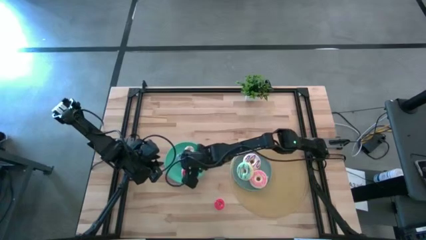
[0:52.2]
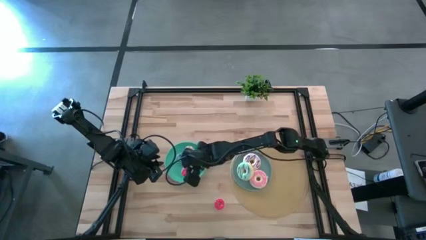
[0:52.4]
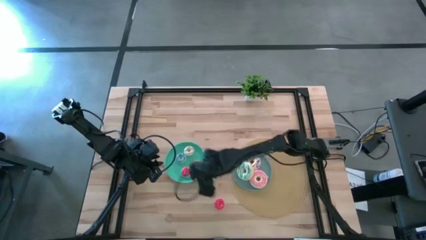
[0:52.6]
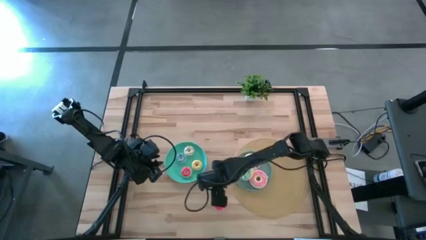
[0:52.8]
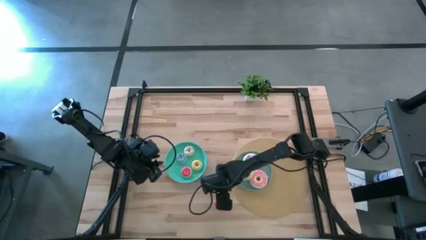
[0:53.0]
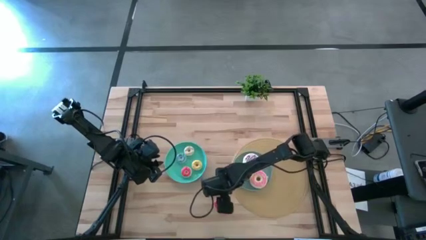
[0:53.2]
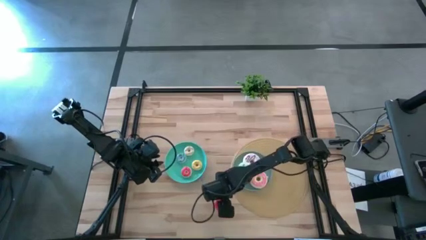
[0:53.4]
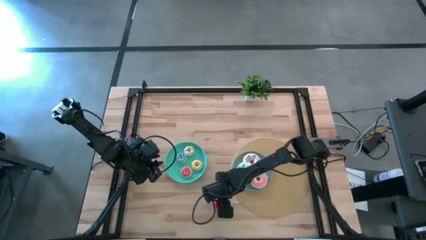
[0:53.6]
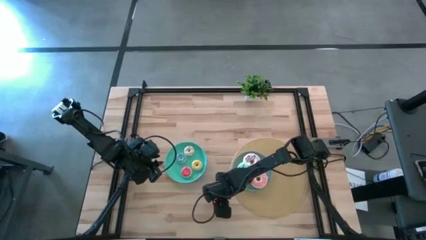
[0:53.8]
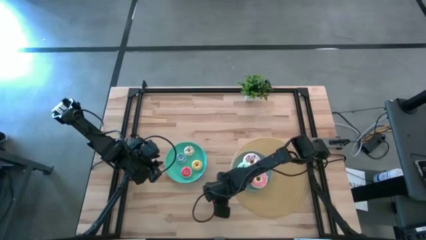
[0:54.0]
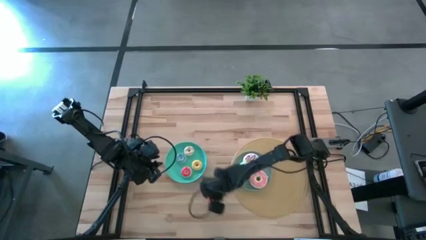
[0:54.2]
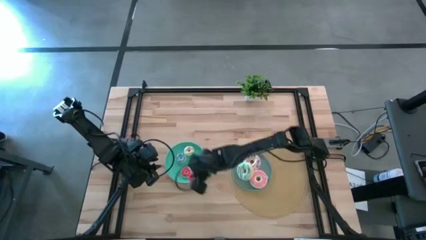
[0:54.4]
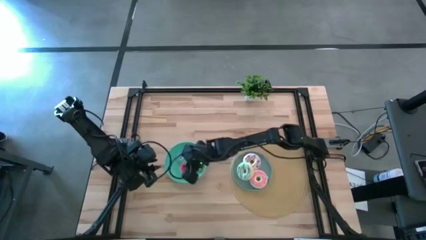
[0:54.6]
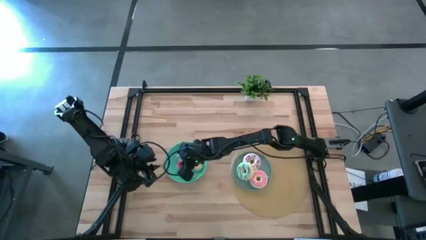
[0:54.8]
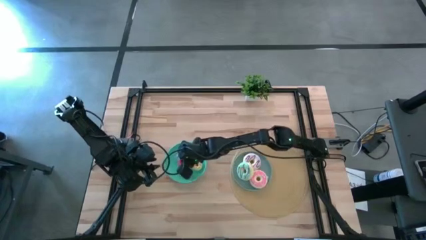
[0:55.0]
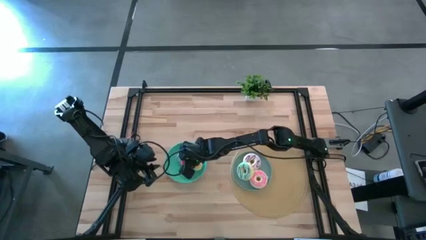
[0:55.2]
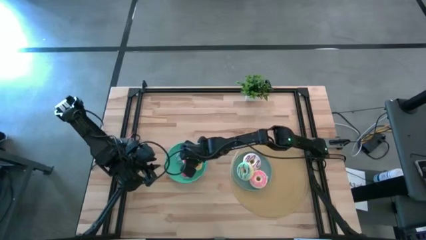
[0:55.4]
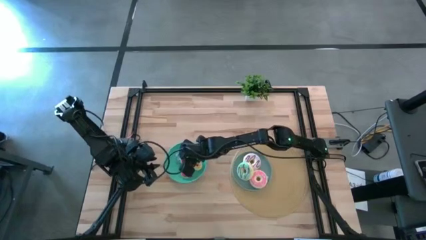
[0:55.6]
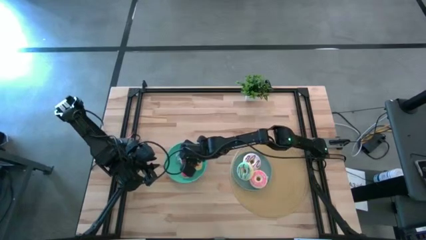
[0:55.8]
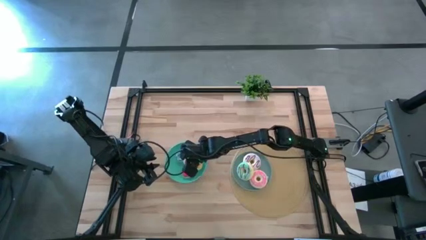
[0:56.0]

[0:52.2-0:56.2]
Task: Pick & Place donuts
Put the small red donut on the light blue plate

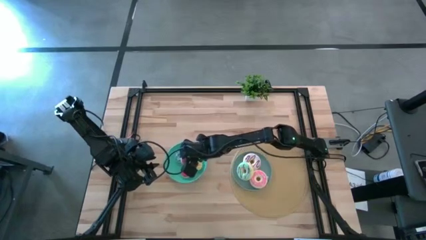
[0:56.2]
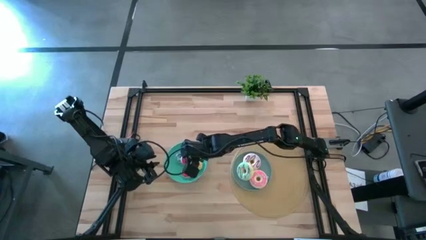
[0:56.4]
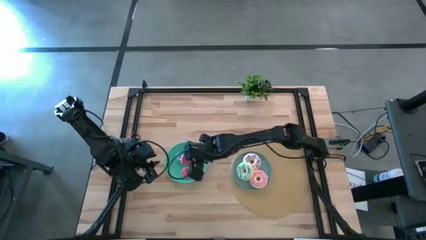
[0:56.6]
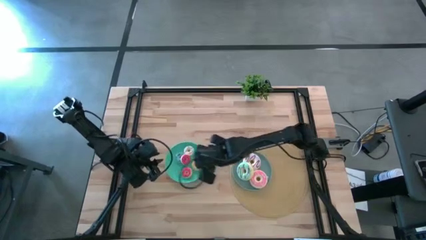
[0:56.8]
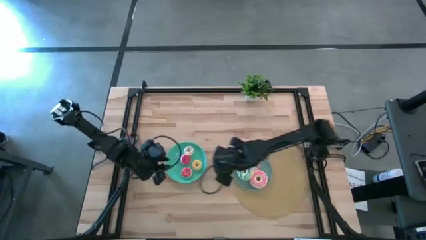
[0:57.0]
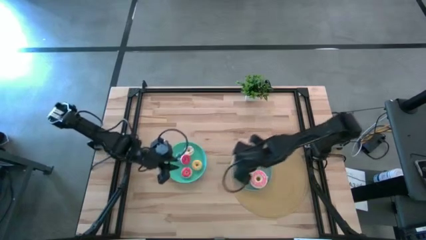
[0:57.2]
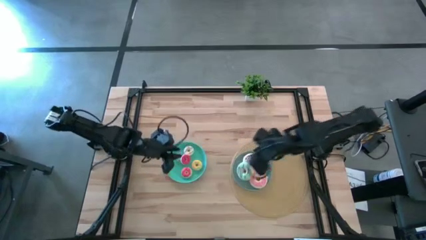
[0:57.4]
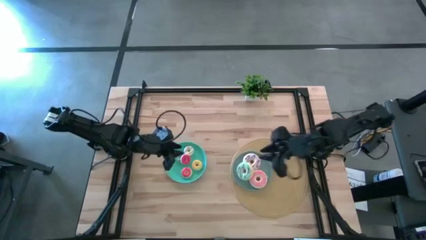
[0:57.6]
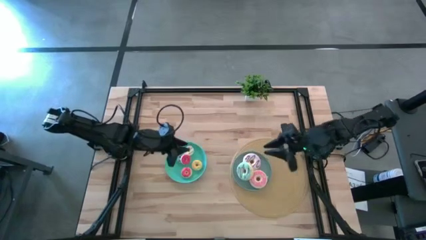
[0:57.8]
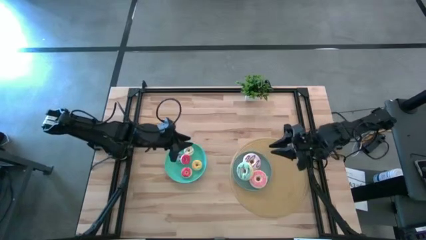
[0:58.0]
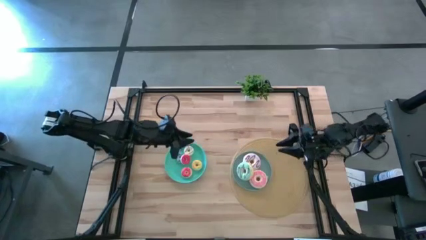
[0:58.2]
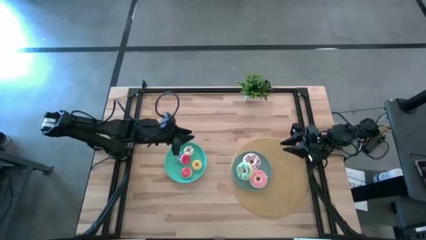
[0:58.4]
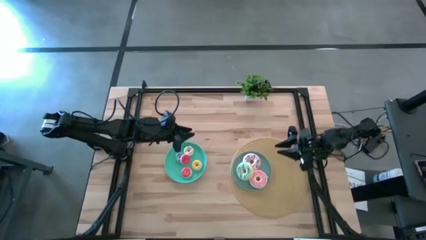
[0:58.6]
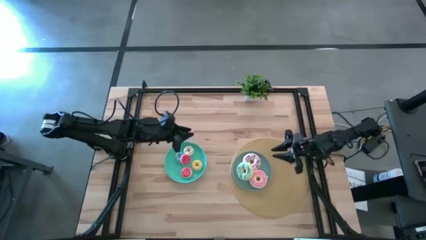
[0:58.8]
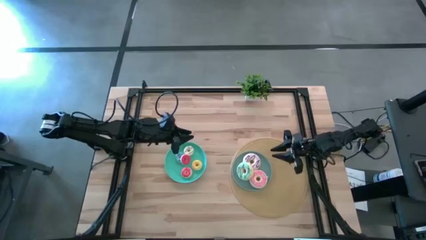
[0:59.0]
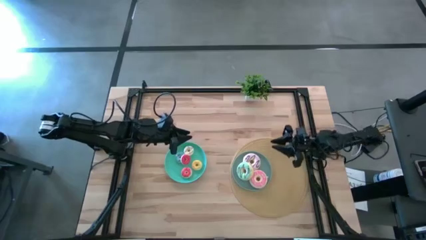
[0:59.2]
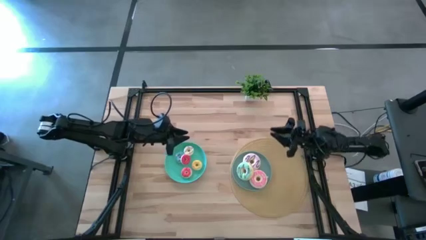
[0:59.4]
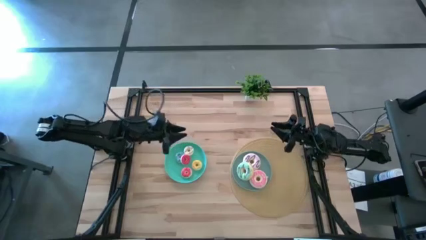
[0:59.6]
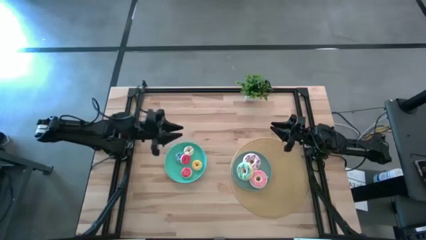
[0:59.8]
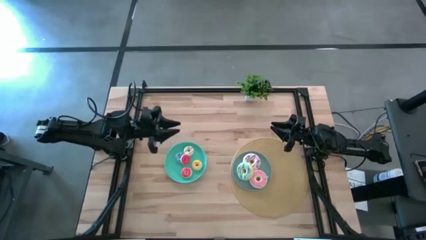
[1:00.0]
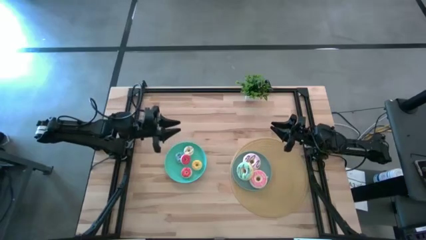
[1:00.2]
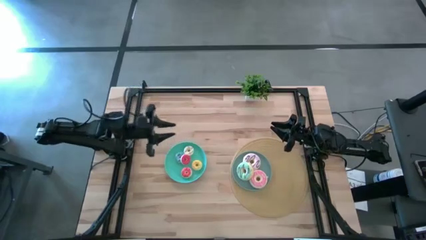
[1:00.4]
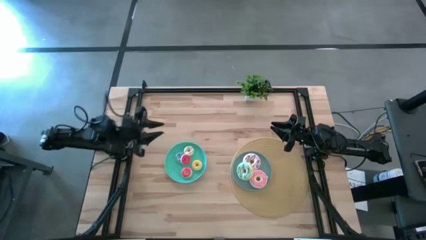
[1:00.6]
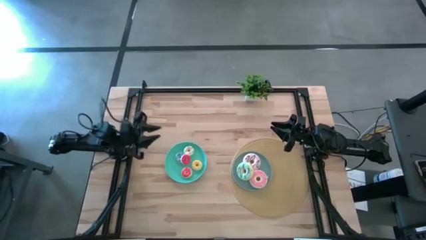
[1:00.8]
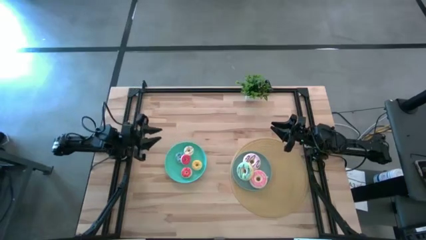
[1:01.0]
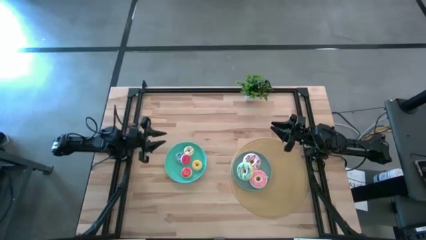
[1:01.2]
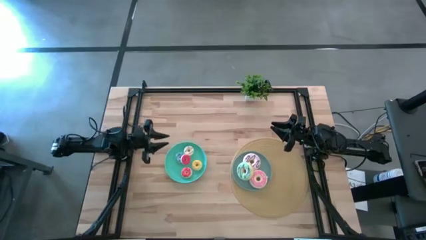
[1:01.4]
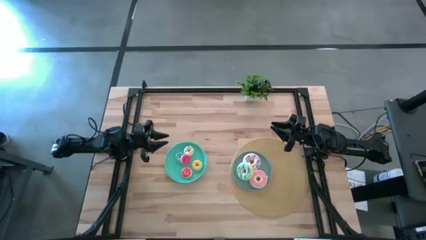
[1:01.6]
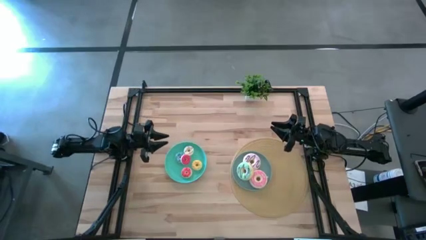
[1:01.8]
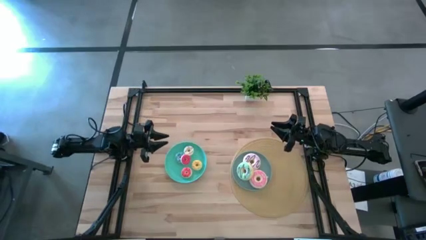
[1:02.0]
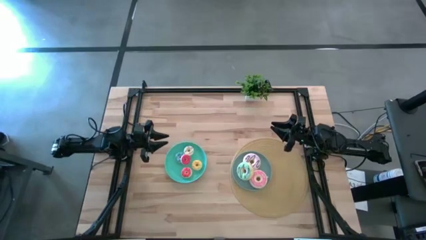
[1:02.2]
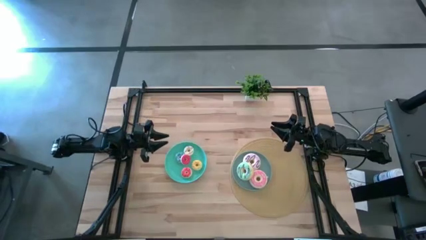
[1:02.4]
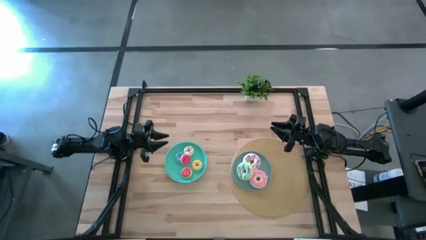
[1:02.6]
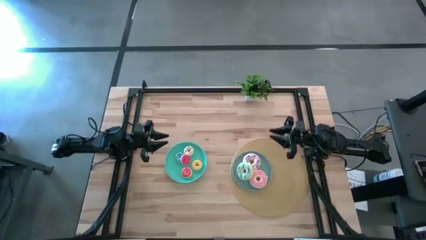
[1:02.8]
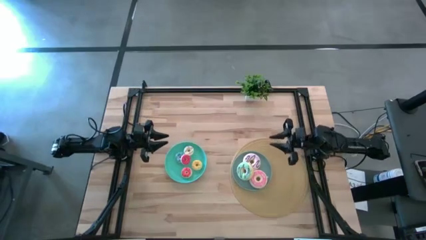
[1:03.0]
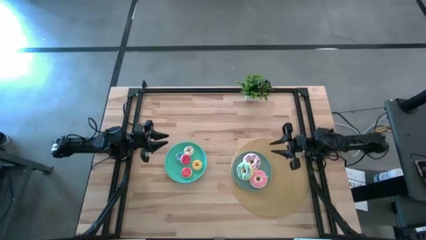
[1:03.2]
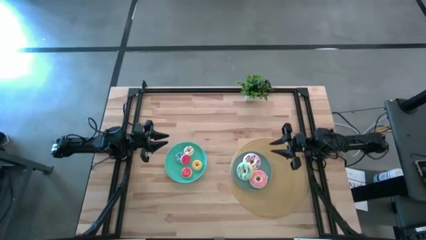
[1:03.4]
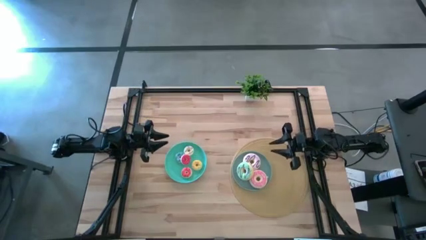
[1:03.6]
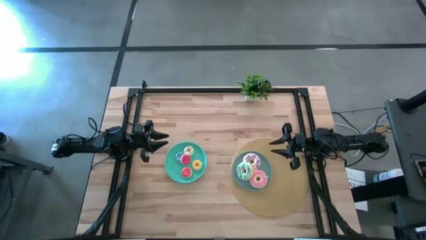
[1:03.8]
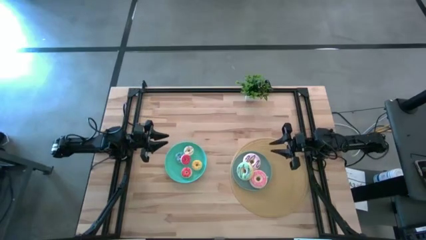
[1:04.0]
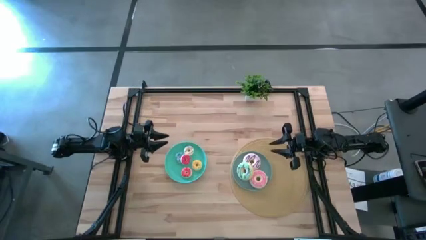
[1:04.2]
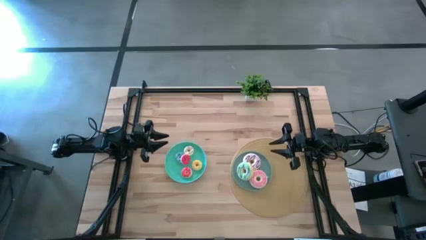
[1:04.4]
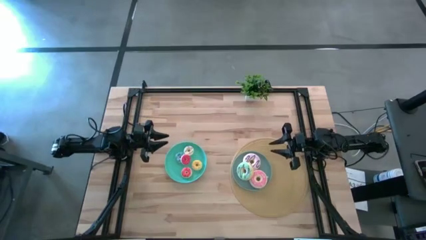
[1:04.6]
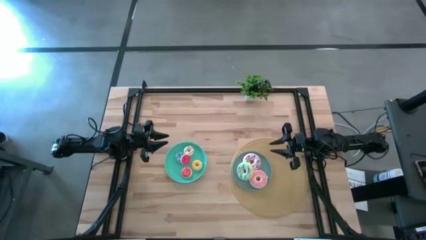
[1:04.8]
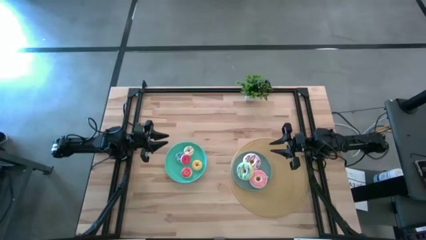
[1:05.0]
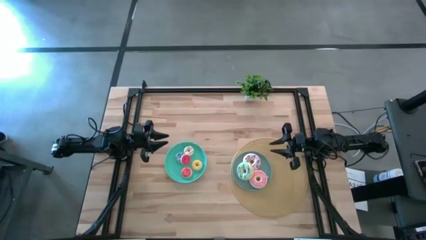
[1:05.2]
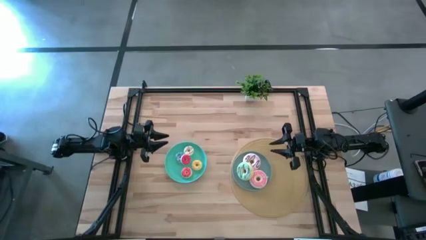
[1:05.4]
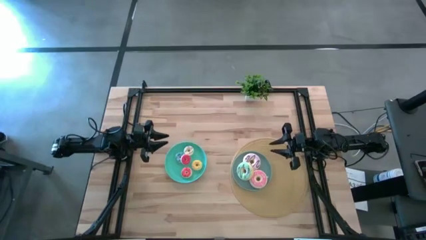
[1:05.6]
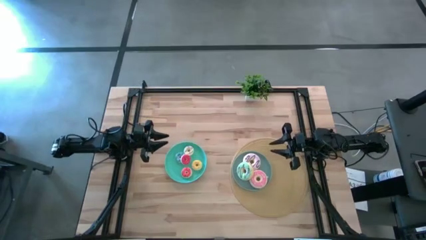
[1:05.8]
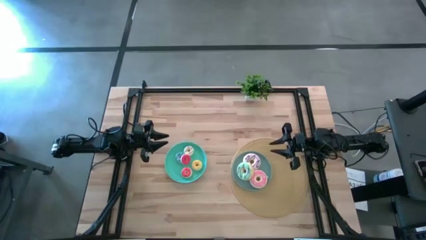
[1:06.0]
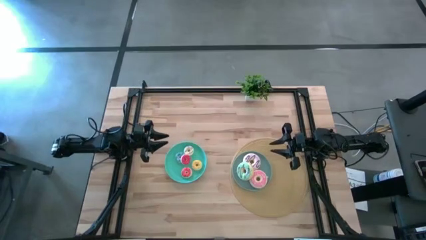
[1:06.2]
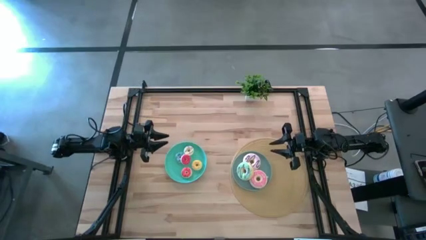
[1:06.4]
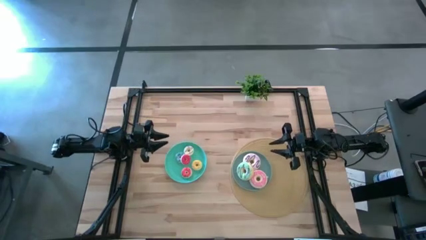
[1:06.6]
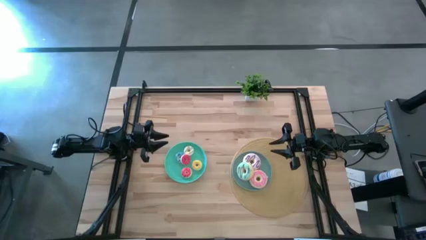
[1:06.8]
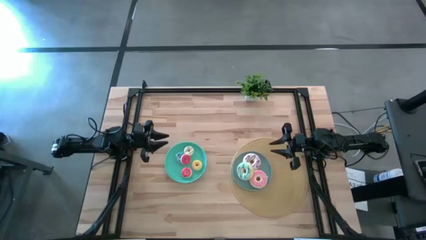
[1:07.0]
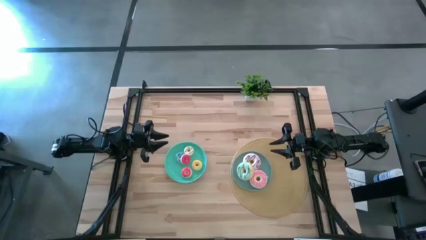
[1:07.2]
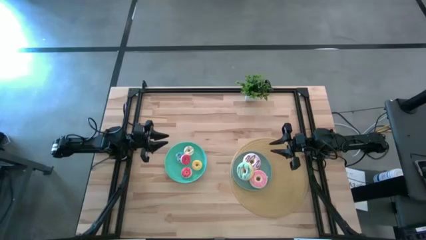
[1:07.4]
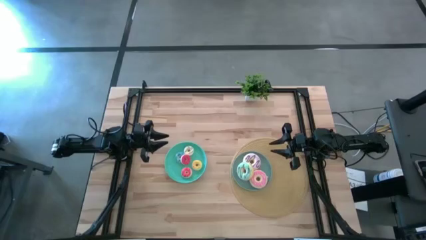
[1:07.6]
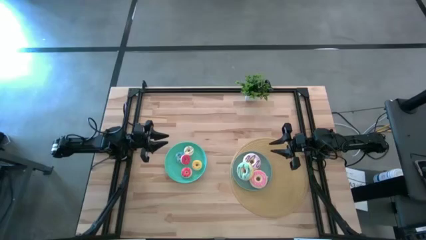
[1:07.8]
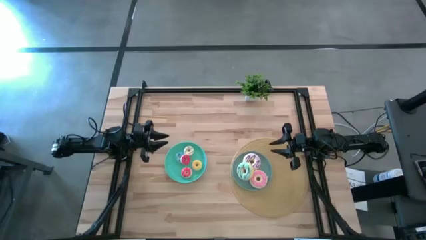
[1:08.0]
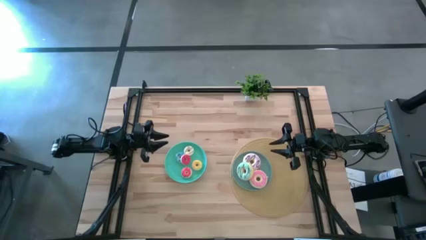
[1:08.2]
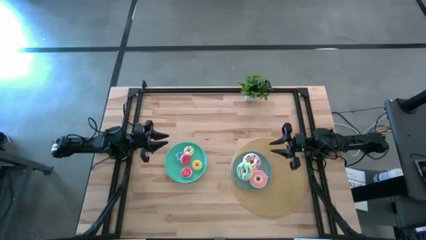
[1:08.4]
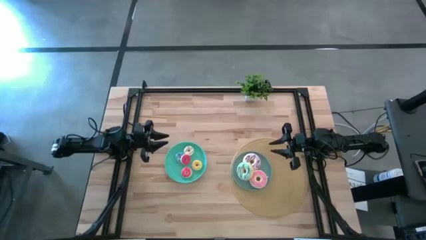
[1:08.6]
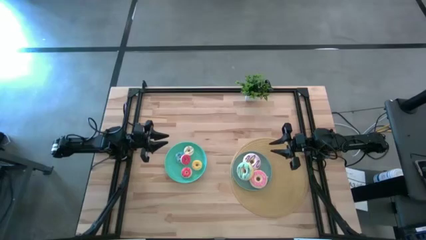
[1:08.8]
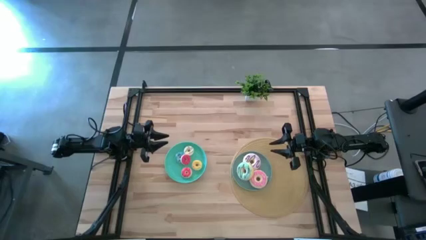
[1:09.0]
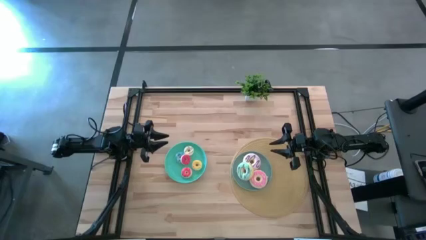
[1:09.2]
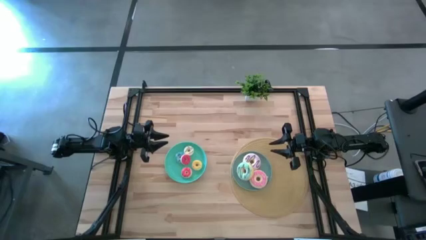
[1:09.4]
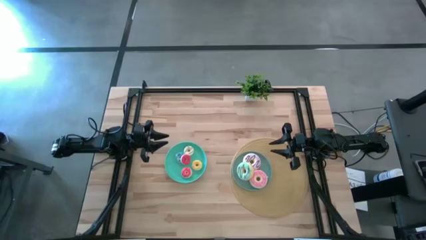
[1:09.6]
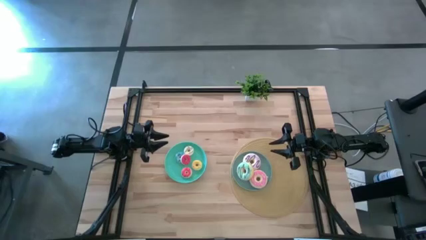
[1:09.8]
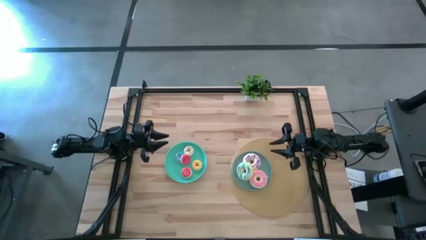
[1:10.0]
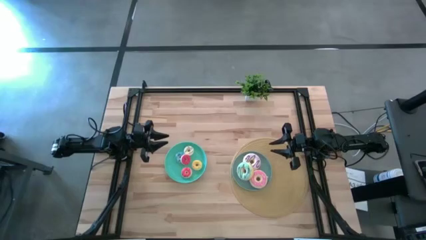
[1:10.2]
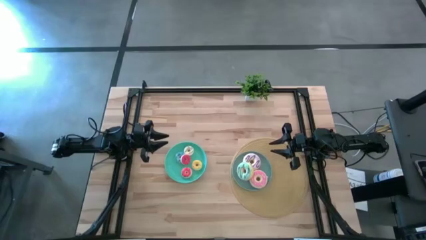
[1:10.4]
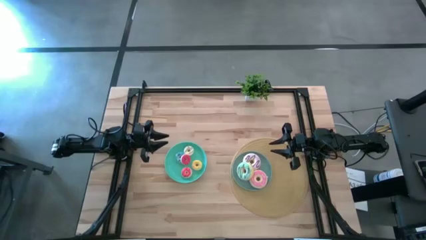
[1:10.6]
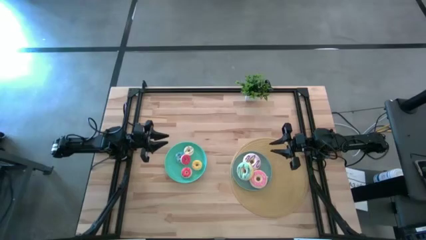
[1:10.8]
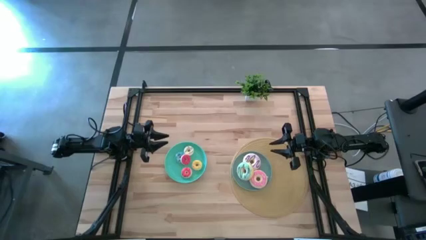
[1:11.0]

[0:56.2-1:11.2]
Return to Home Position
